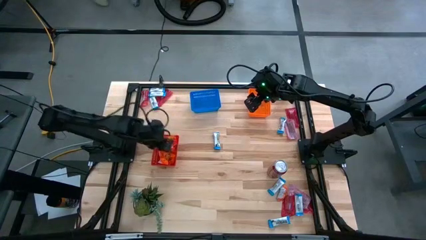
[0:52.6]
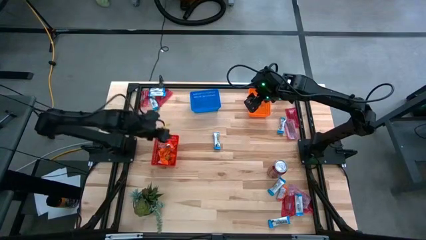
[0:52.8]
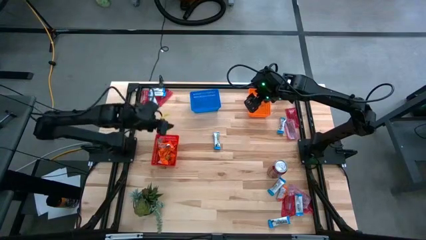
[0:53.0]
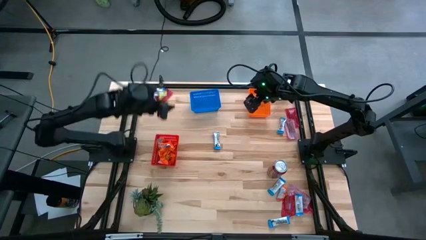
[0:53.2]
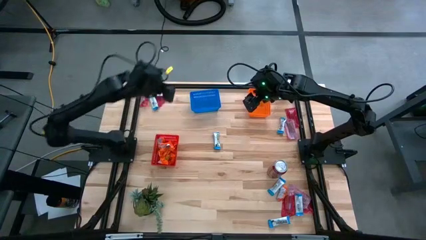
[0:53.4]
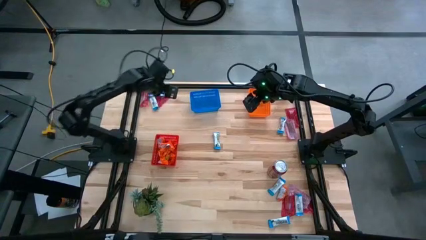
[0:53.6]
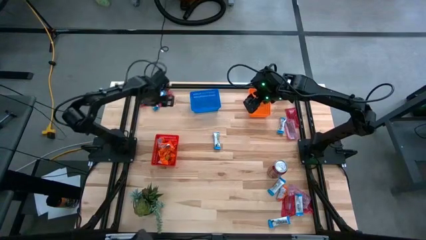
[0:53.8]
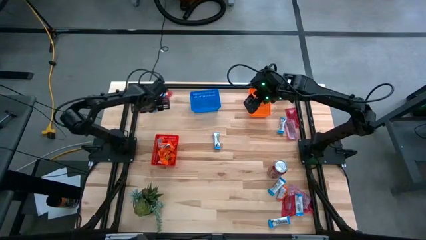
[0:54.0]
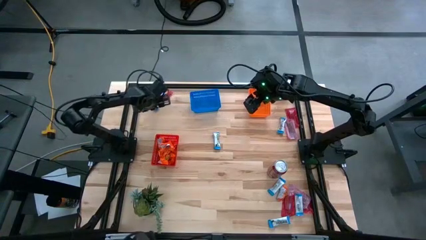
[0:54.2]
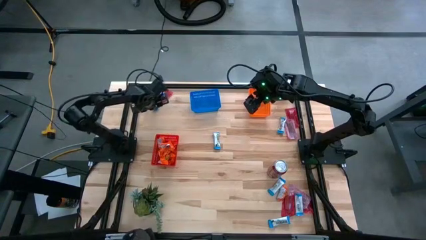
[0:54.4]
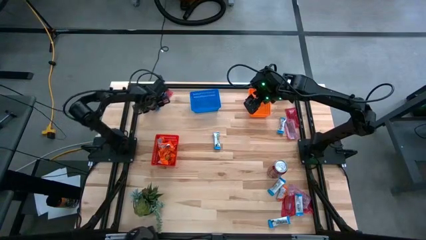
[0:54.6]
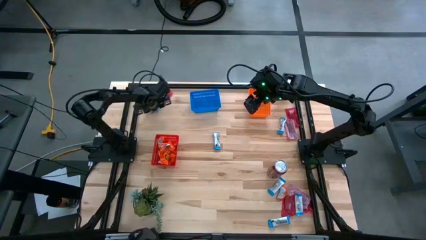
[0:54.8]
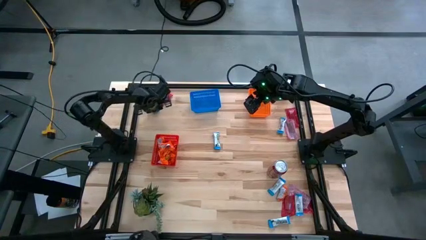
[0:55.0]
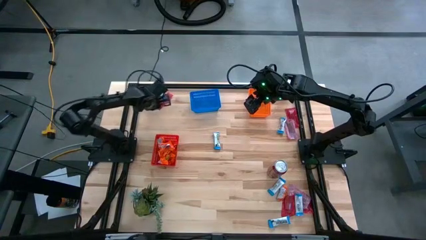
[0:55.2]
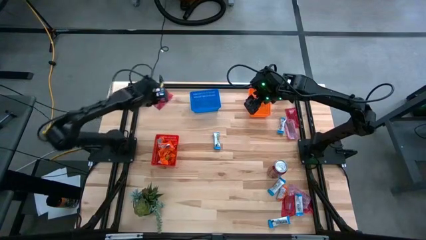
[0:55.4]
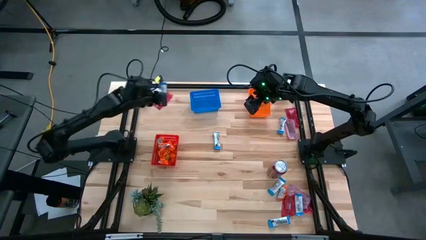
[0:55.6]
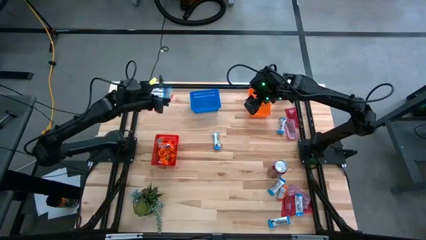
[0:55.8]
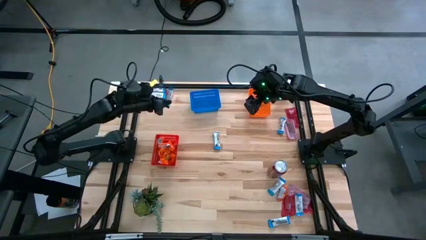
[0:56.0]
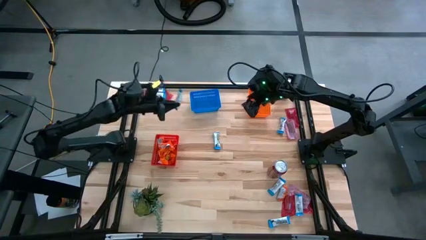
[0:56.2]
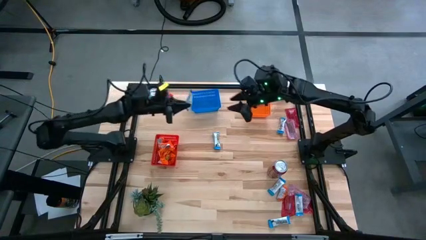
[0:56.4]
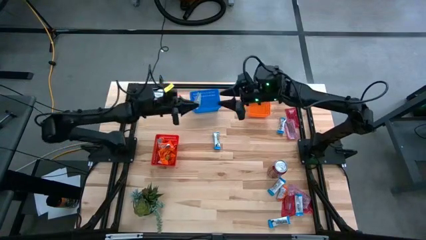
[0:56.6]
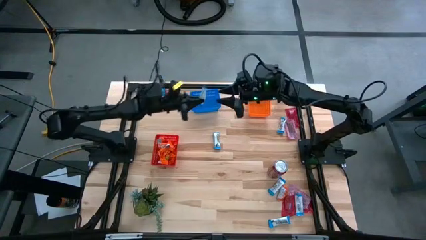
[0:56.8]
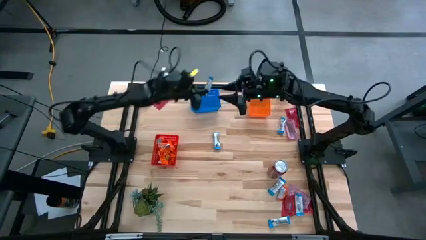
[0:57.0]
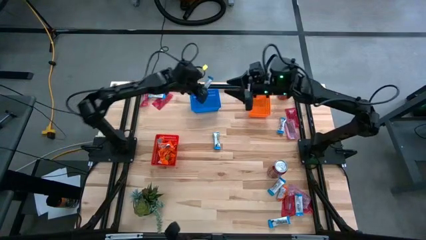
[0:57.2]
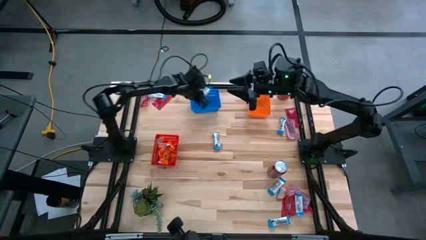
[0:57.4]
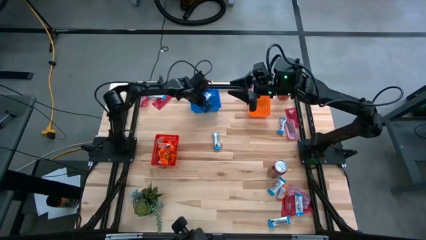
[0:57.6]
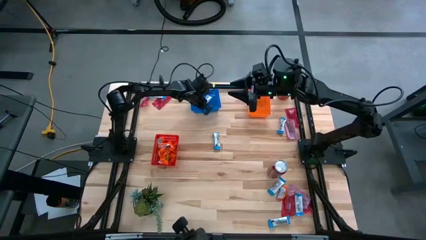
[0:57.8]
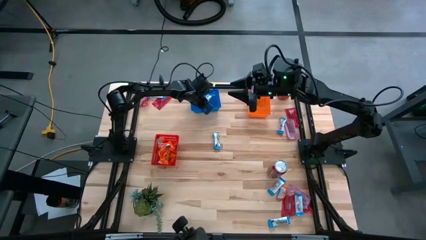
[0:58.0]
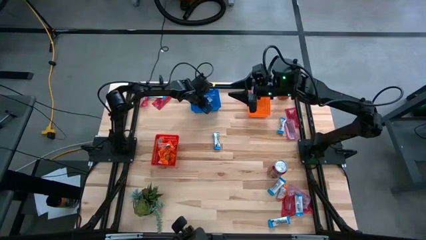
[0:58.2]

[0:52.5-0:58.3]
Task: Sort candy
Put the white candy pack into the blue basket

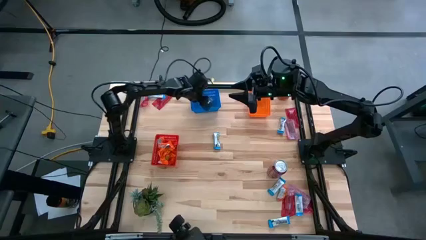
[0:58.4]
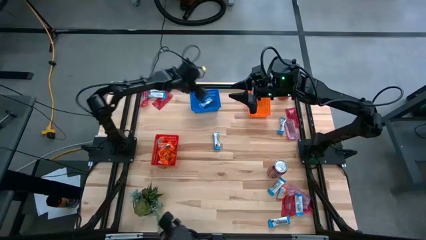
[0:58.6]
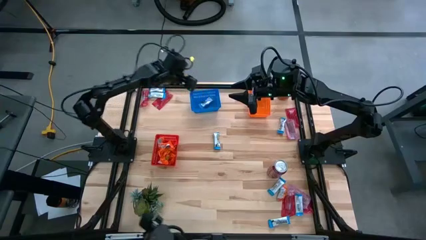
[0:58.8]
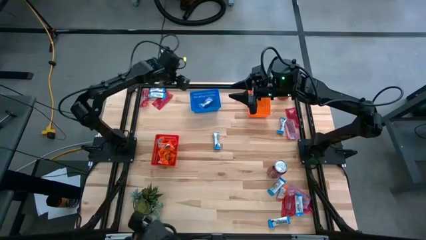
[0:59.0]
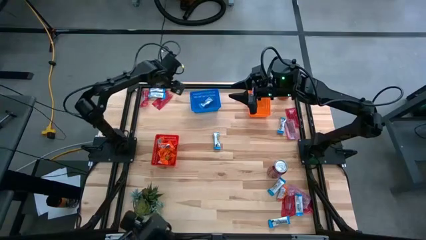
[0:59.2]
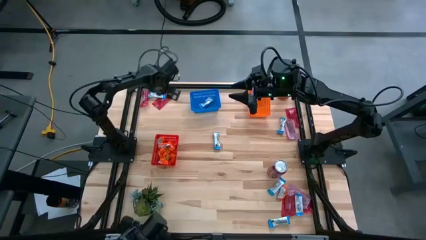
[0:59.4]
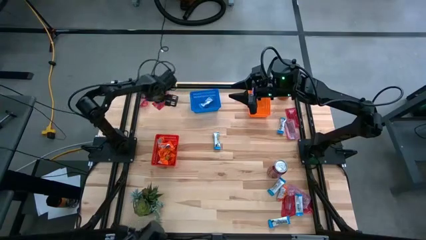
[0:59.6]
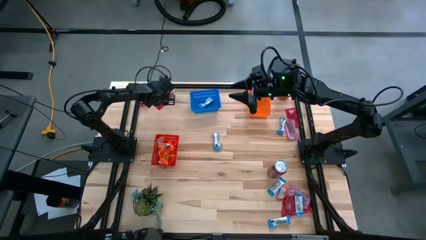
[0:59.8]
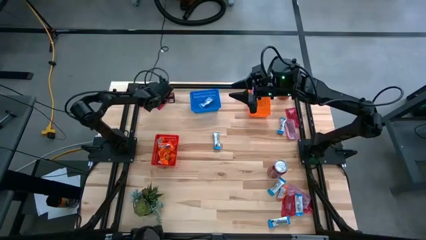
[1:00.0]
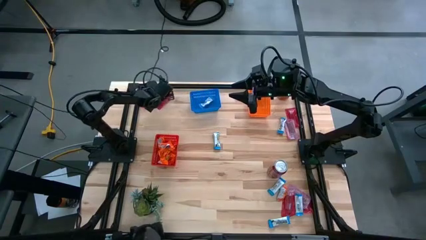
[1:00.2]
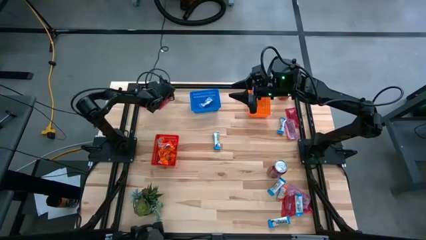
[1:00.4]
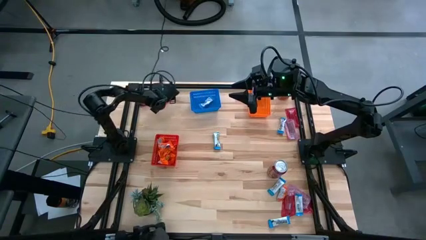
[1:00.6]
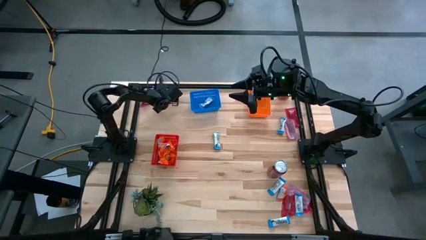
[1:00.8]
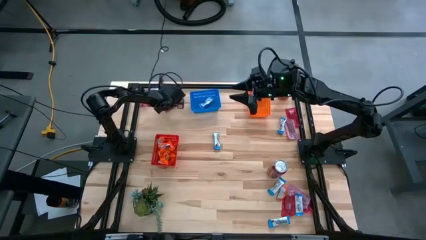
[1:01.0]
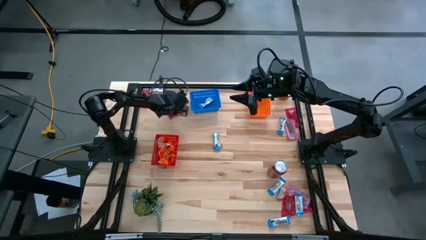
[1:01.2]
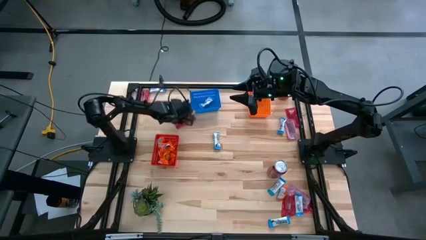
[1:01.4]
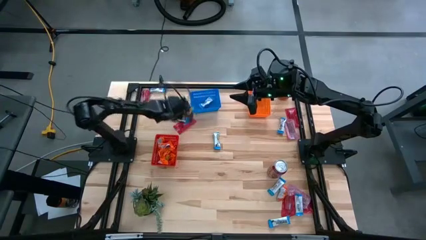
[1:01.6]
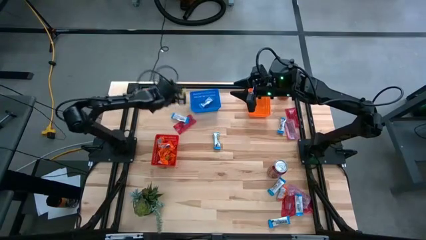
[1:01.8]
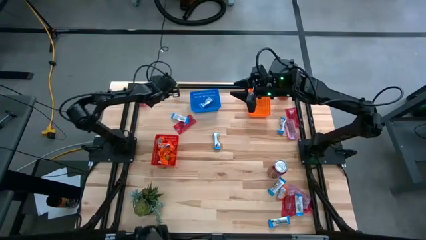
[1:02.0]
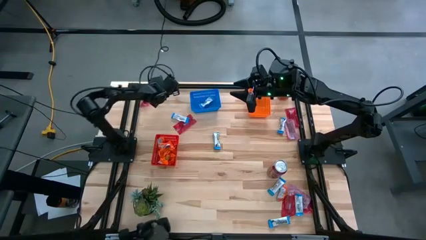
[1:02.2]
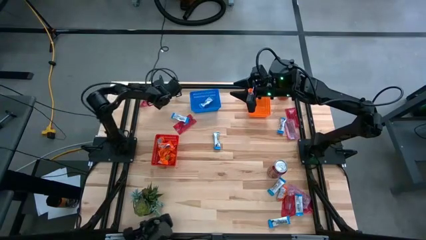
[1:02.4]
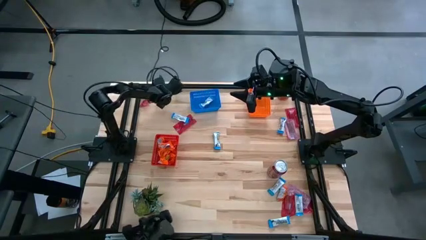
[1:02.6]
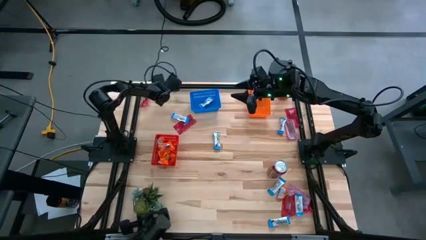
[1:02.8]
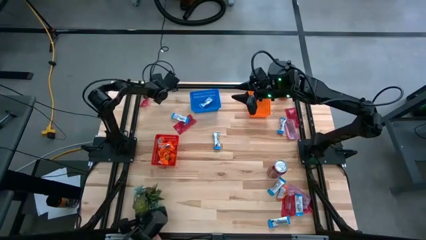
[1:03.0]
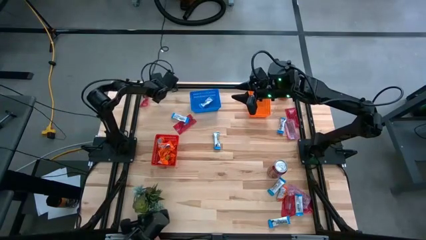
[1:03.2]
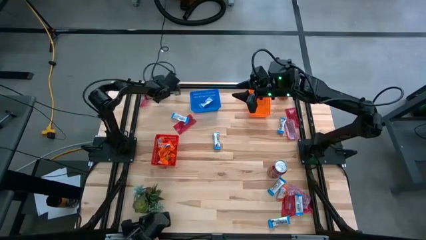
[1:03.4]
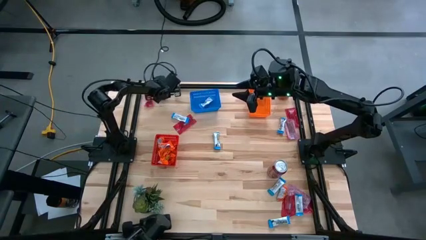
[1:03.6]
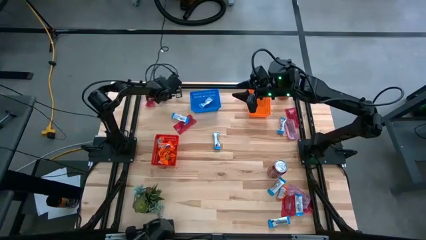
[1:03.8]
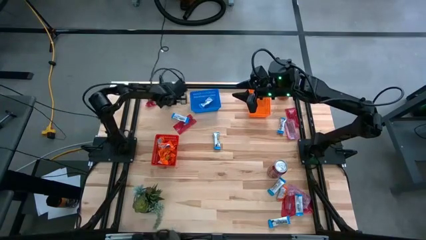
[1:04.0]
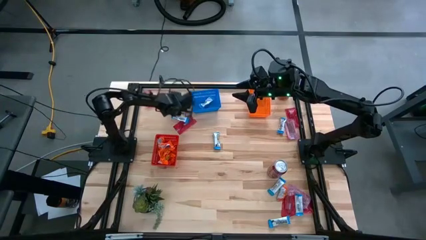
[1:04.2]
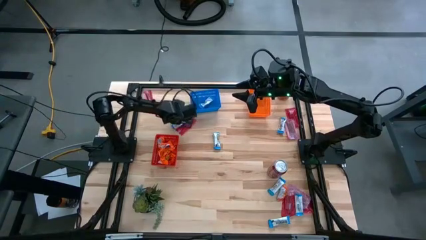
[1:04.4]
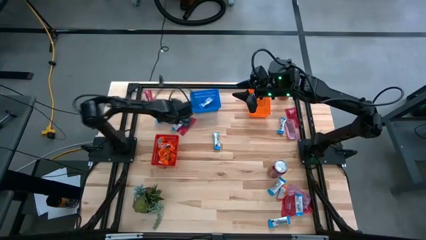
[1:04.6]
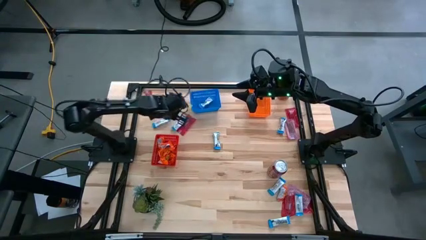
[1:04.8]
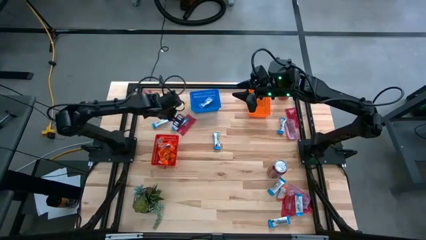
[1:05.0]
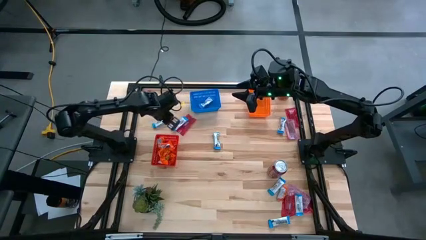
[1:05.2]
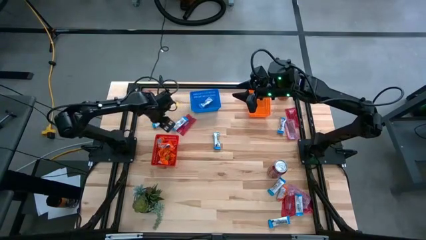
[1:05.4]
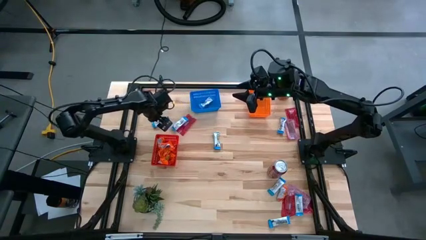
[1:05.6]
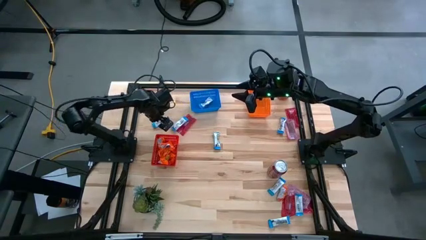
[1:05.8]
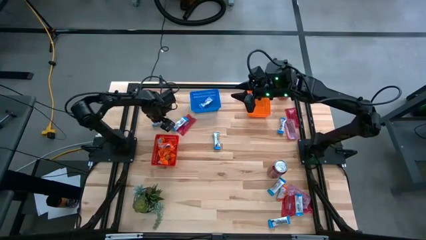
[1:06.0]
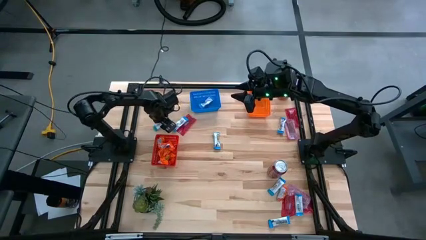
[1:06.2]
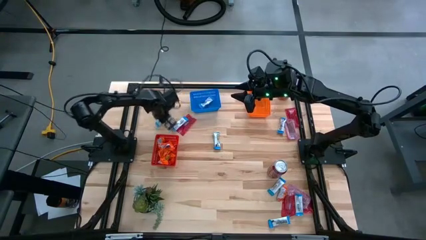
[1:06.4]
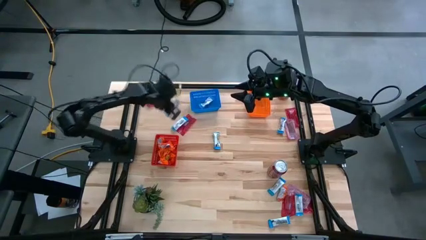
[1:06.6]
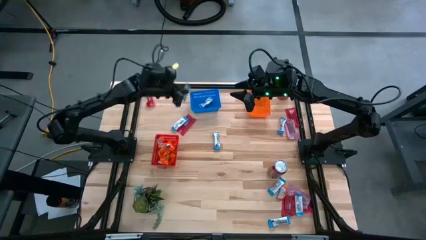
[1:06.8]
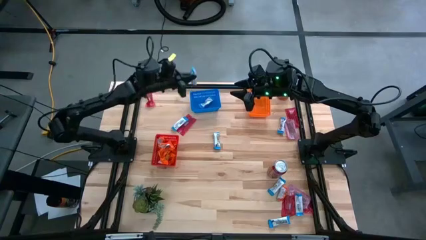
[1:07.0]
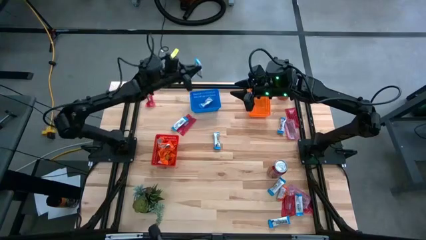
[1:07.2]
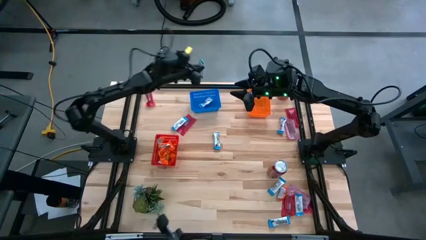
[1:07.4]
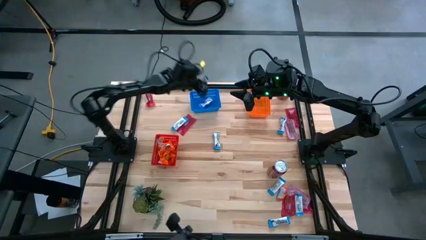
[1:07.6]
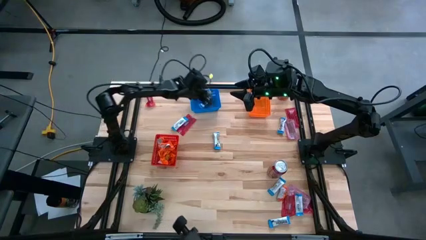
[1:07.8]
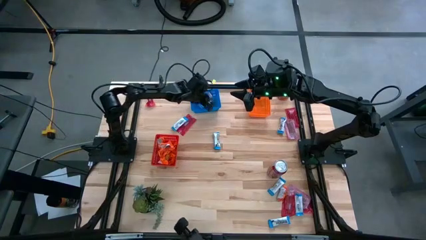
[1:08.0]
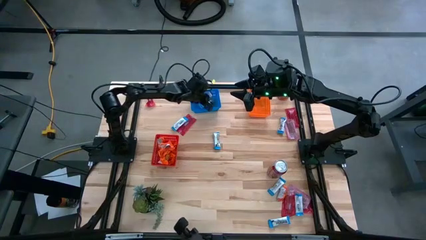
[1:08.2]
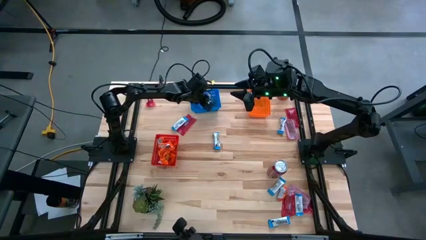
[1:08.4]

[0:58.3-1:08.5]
Put the white candy pack into the blue basket
